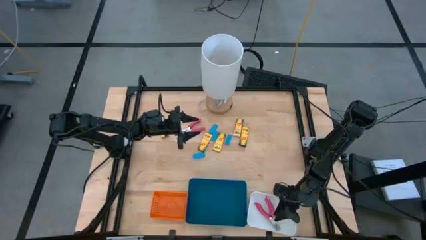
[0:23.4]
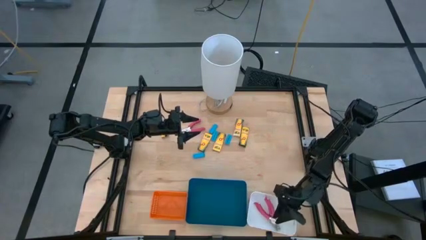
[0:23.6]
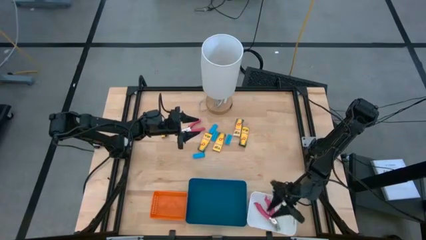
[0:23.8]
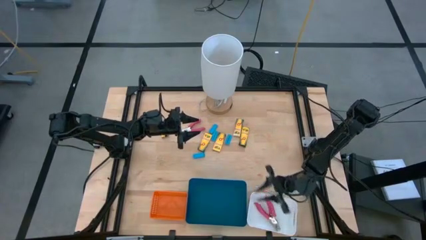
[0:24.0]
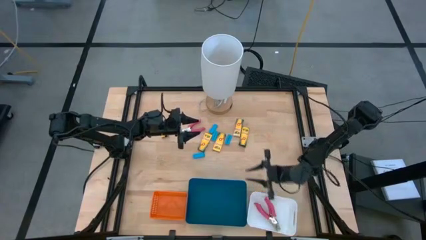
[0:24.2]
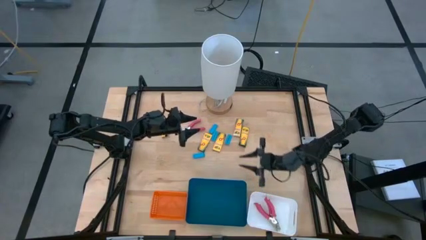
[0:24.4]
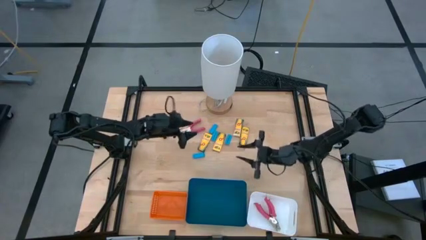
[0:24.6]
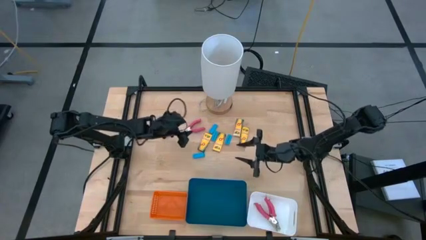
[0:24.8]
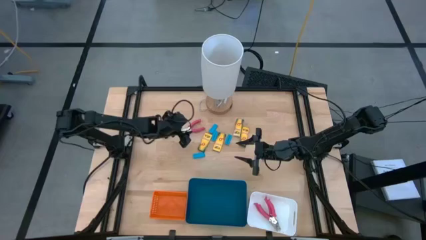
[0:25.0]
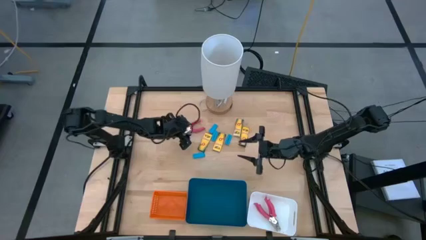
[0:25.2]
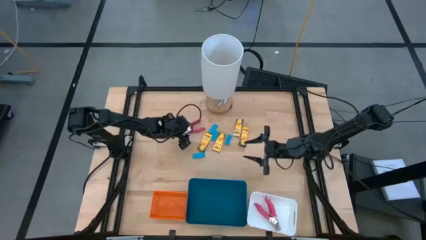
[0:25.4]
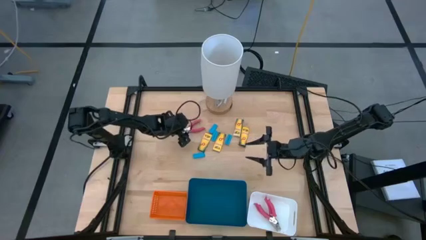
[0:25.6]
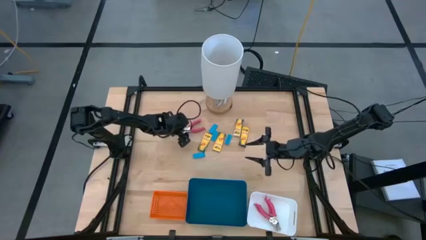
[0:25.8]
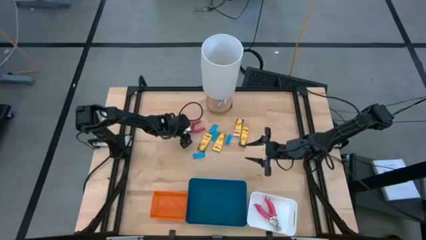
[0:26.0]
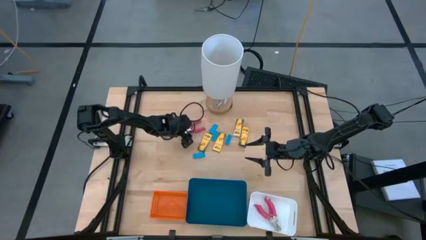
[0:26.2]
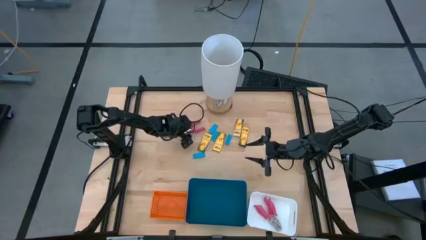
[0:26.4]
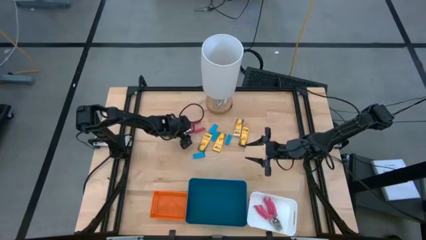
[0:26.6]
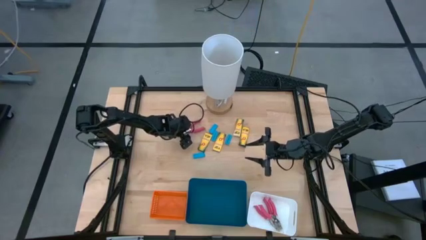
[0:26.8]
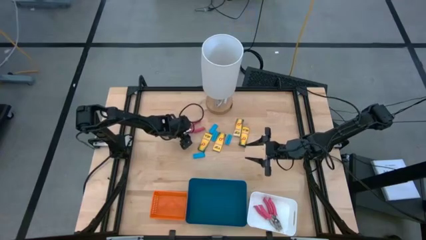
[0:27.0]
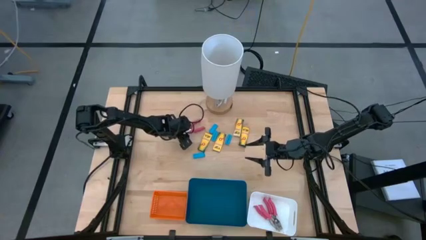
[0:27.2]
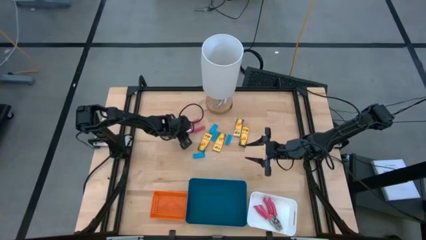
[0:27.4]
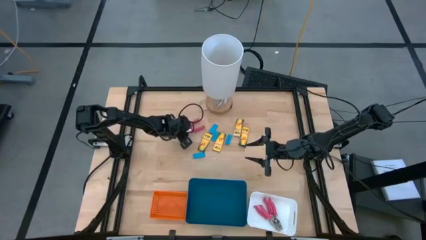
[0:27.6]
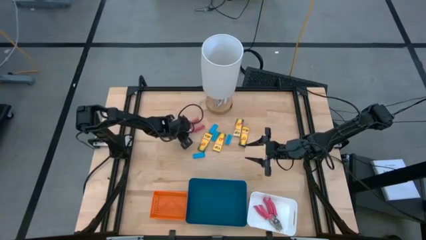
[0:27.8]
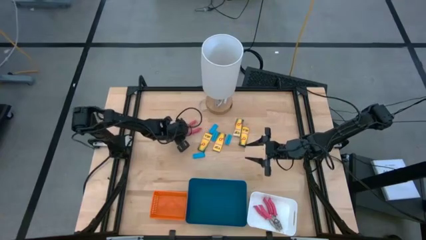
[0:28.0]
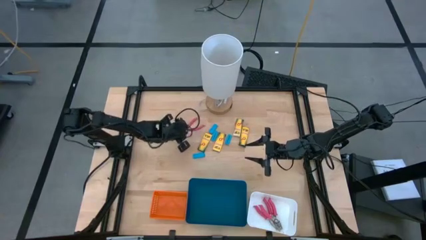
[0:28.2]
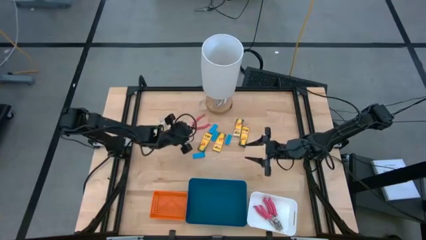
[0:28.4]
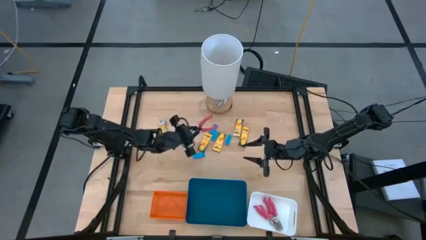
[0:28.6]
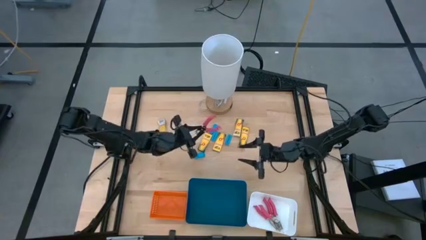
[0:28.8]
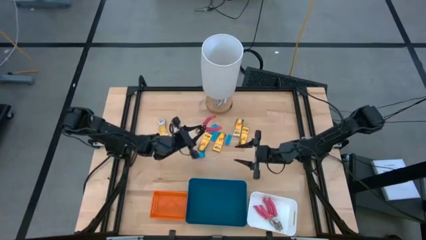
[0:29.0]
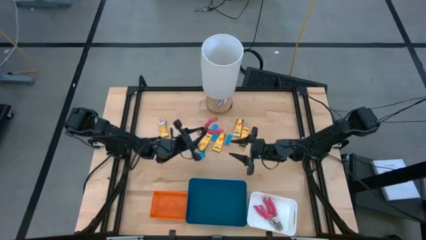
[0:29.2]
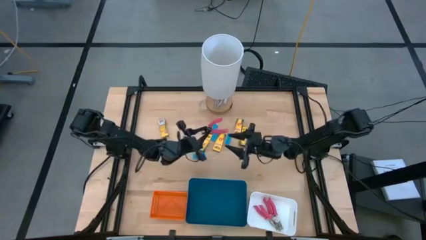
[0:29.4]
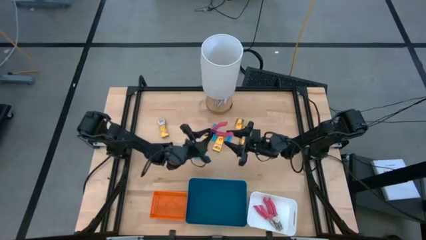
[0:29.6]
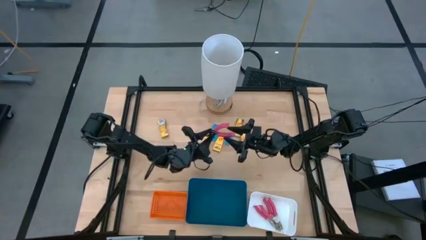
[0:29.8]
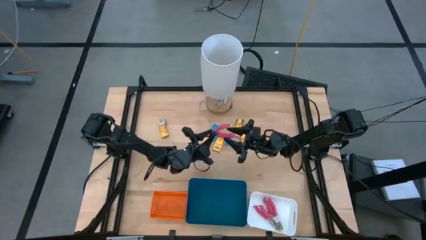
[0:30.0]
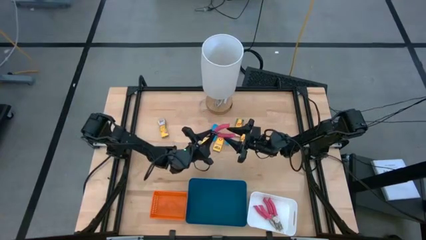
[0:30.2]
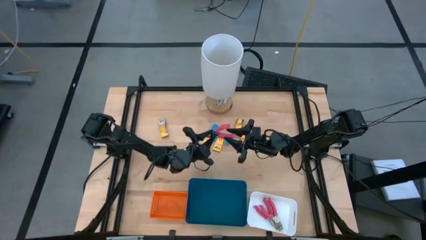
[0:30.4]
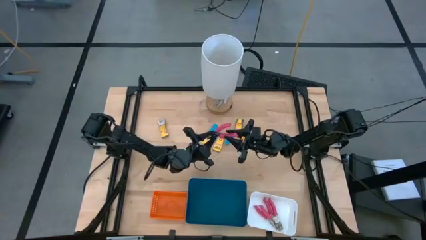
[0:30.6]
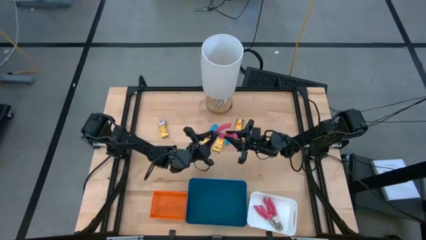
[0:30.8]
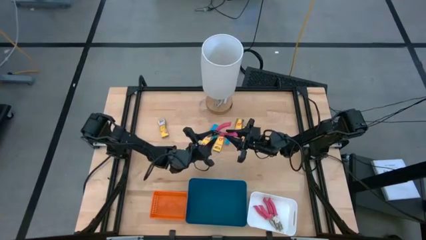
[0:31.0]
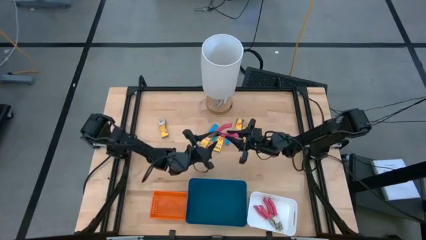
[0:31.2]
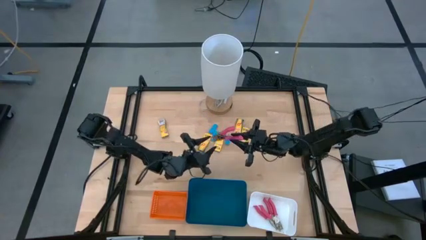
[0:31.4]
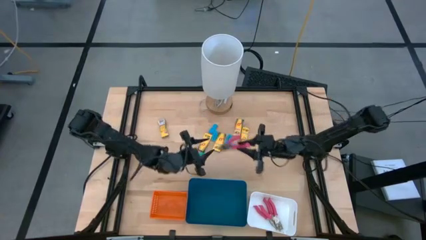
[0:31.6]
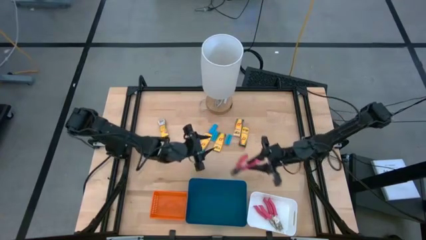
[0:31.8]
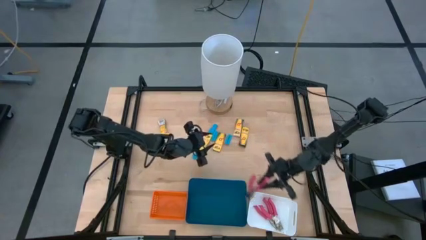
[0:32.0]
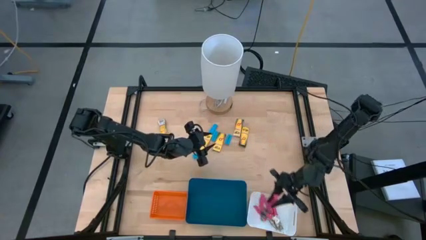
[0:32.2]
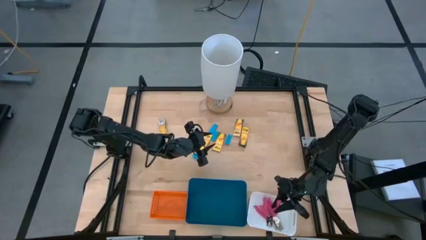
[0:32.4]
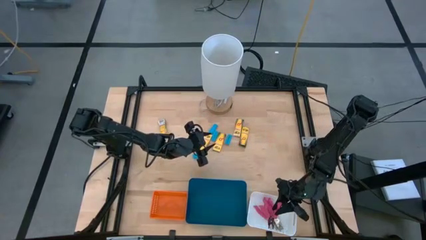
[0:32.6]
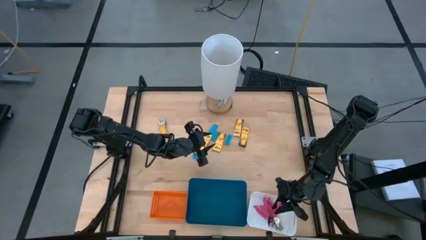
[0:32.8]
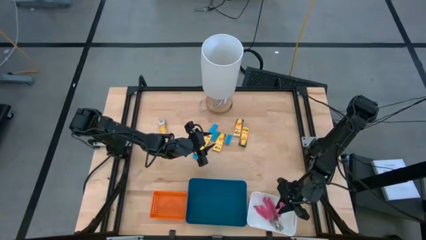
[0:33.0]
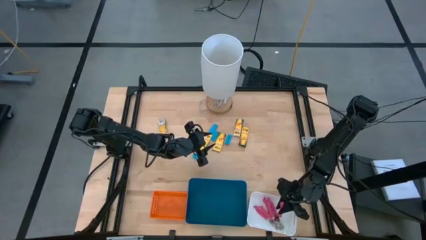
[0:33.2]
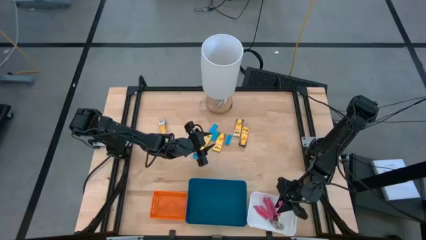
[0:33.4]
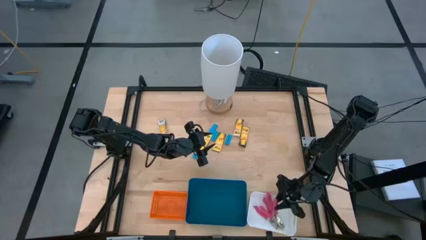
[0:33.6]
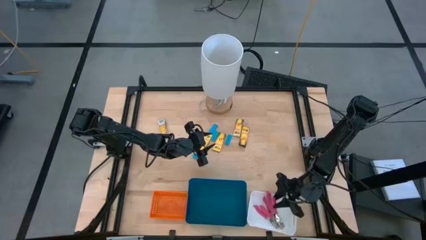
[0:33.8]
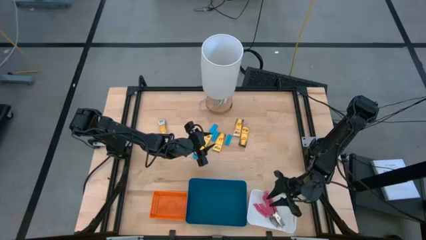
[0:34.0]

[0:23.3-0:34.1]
Task: Pick & Place School Supplies
Put the pink hole puncher into the white bin

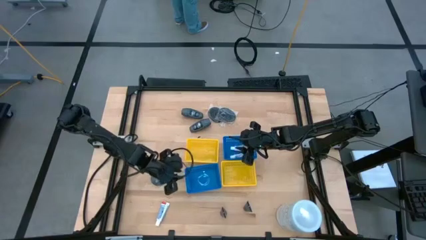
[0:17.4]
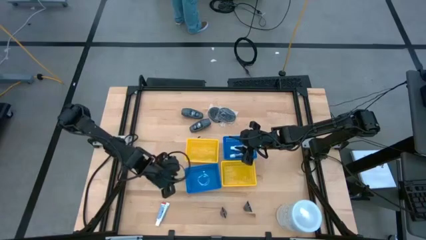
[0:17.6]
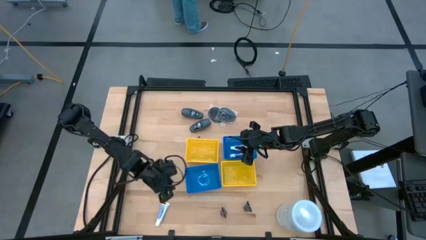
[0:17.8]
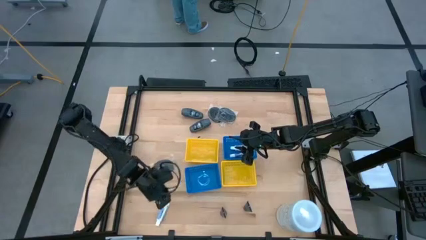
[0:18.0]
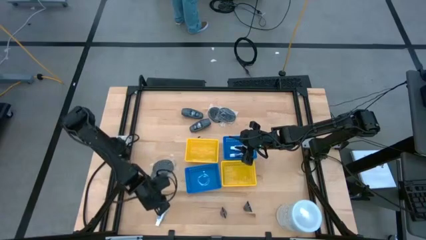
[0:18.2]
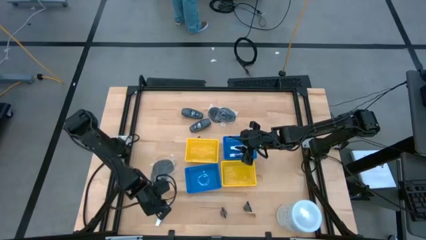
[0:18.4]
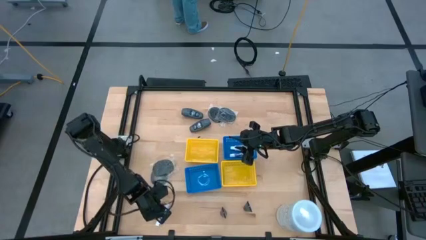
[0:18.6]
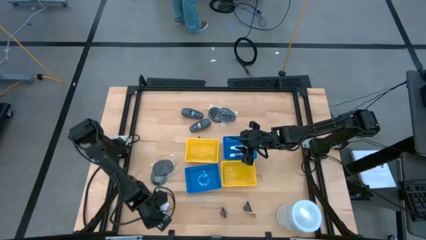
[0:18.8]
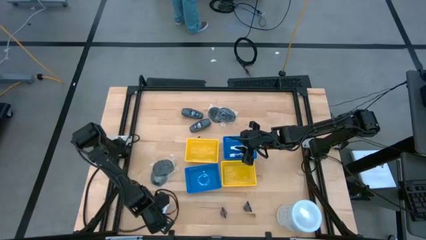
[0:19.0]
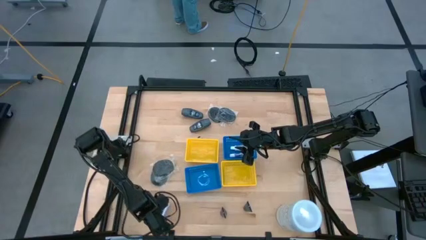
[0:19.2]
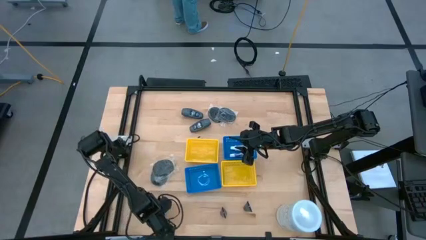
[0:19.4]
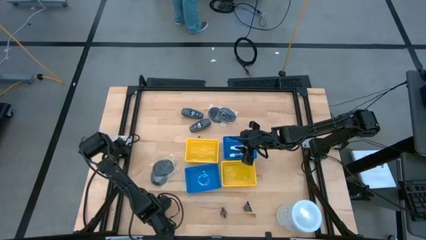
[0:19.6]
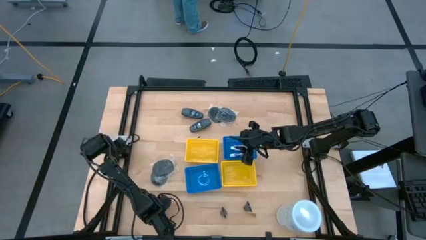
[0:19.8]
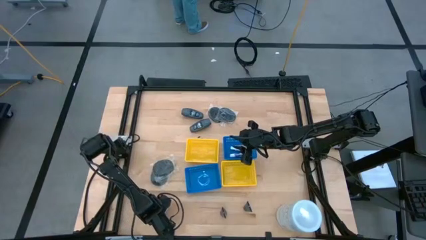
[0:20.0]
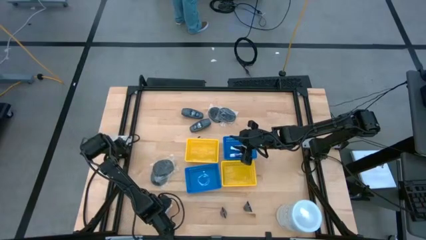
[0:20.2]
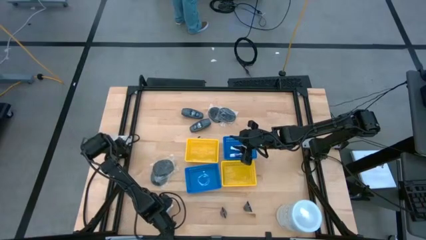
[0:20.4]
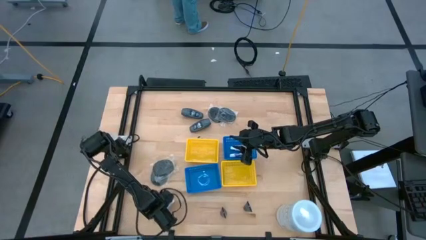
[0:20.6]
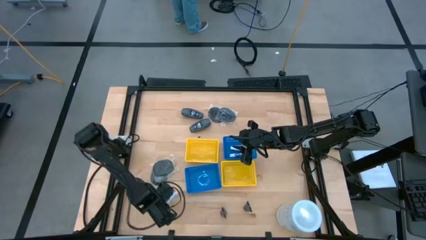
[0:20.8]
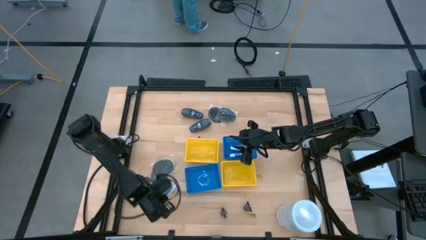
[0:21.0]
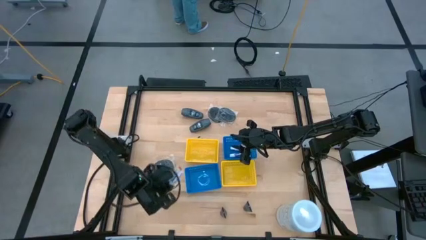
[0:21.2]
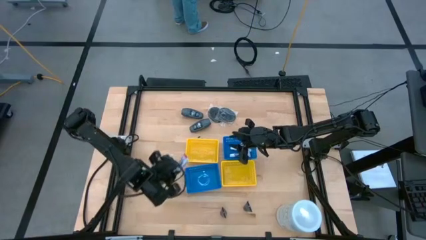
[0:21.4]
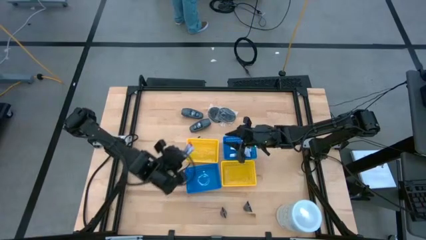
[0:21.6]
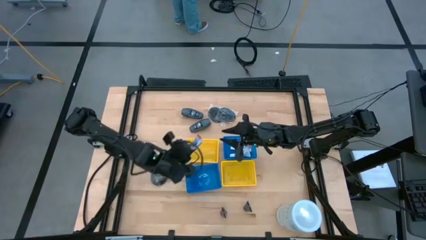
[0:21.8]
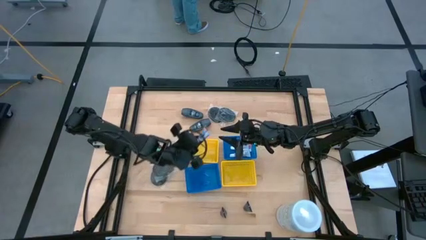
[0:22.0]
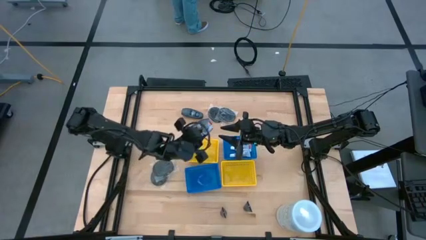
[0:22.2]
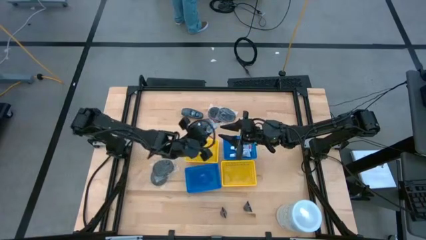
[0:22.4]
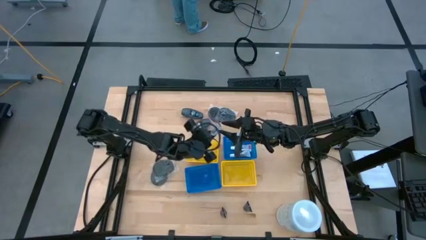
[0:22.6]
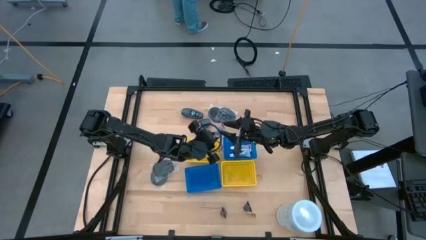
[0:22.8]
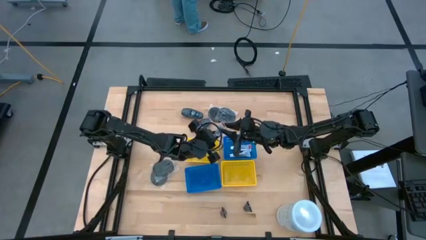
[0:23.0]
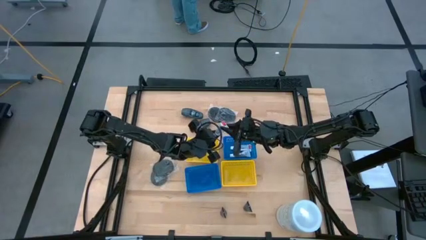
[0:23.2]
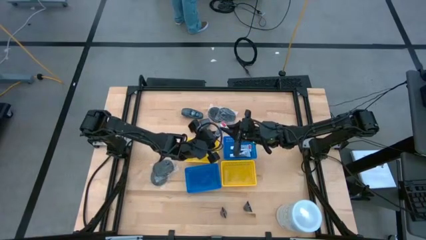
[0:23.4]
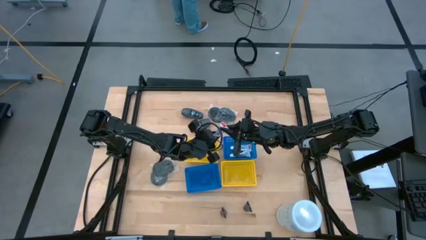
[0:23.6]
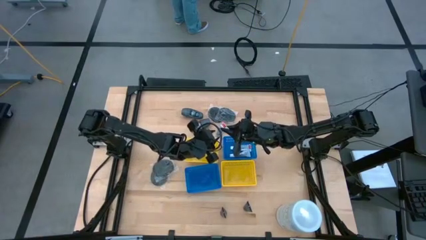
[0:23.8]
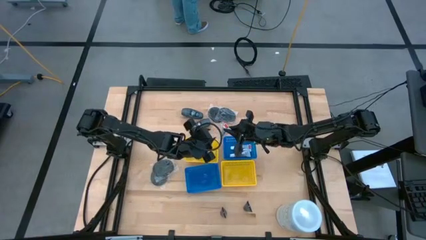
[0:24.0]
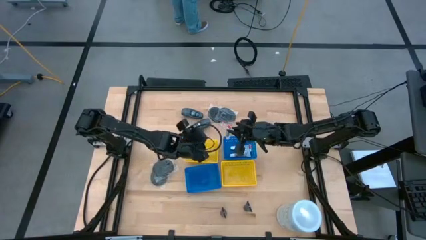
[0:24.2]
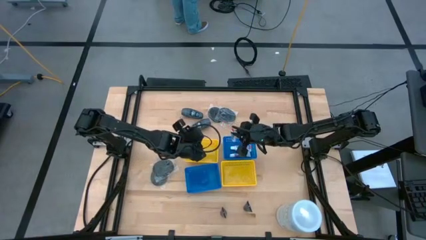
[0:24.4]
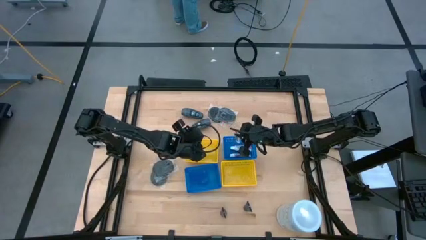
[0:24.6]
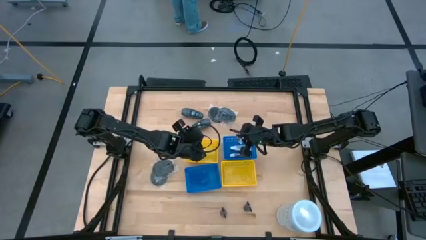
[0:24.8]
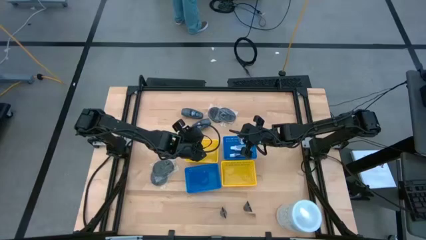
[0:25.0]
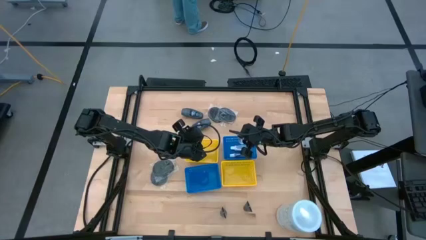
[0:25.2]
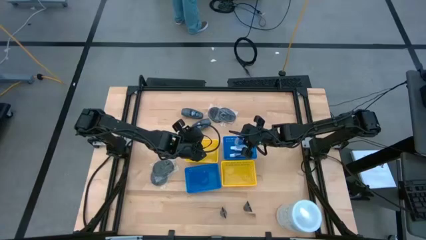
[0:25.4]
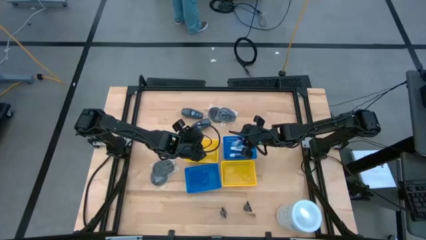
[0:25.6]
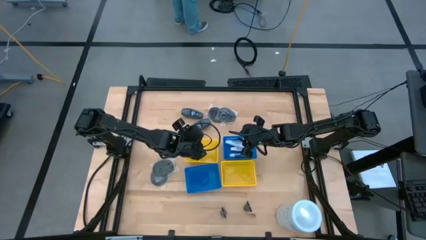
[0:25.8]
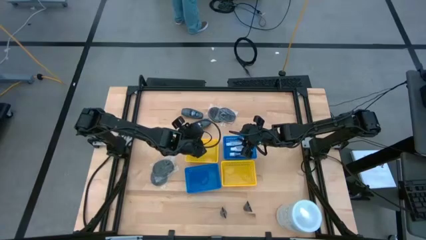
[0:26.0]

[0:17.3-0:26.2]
Task: Pick & Place Travel size toiletries
Put the toothpaste into the top right blue bin
